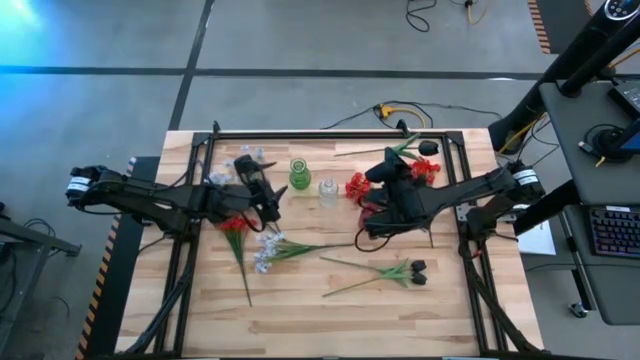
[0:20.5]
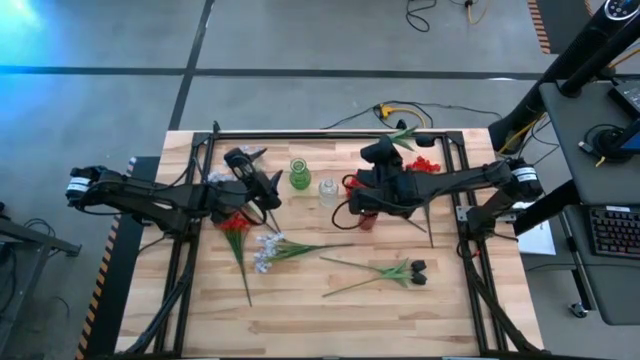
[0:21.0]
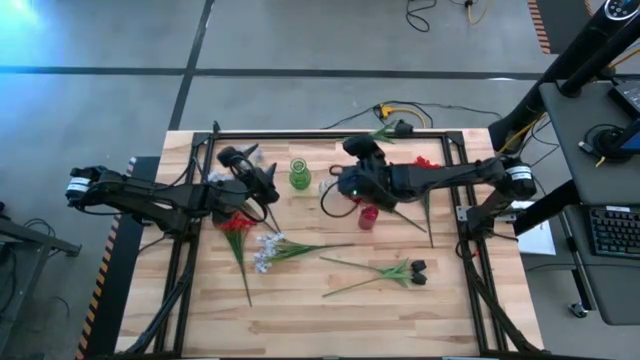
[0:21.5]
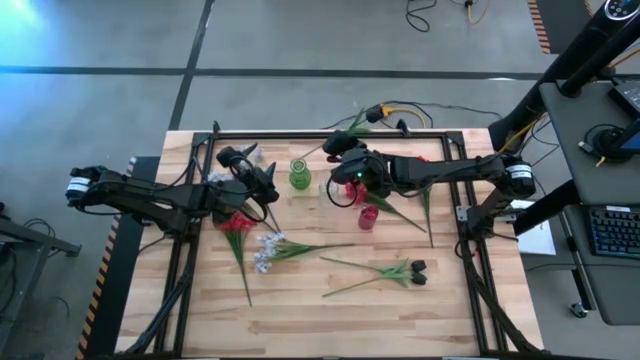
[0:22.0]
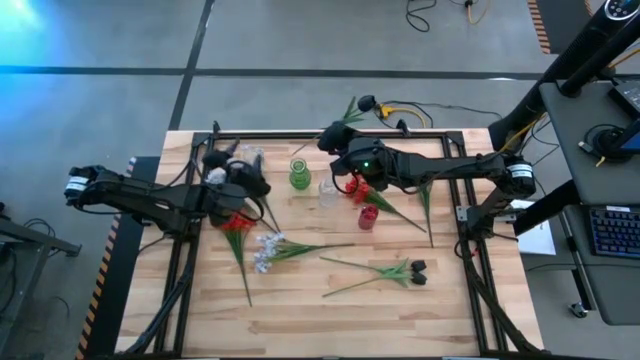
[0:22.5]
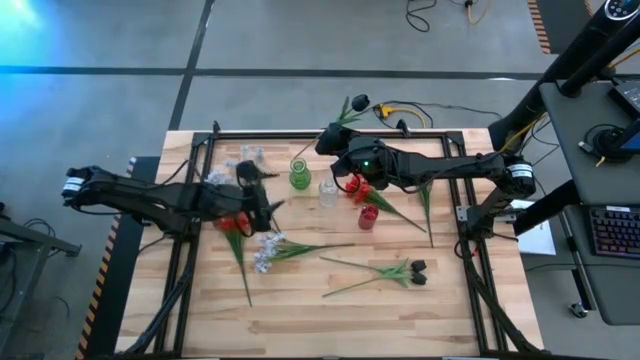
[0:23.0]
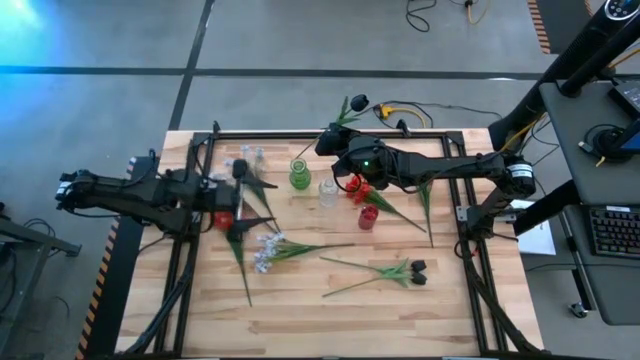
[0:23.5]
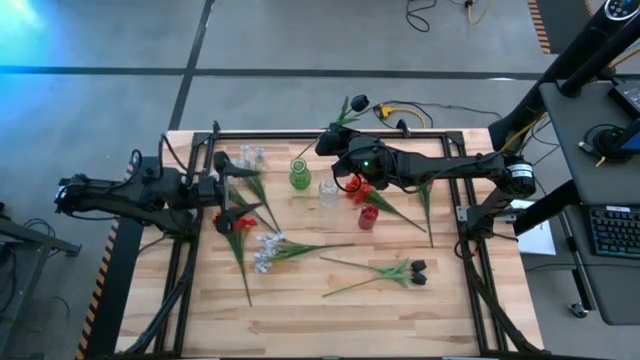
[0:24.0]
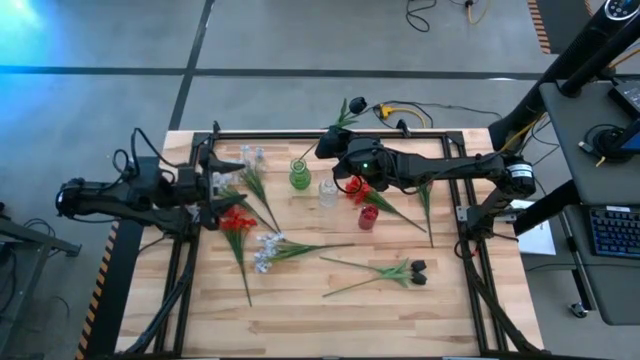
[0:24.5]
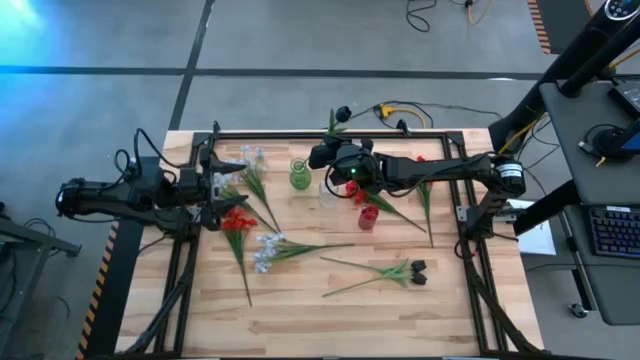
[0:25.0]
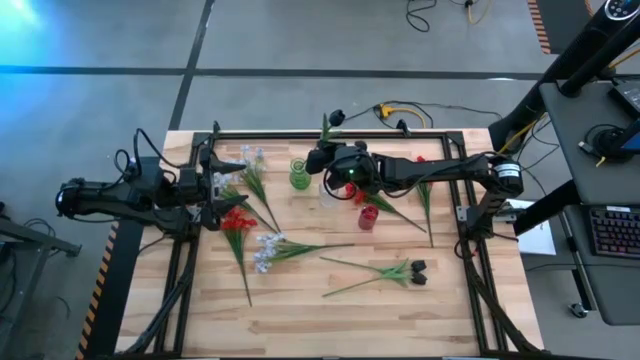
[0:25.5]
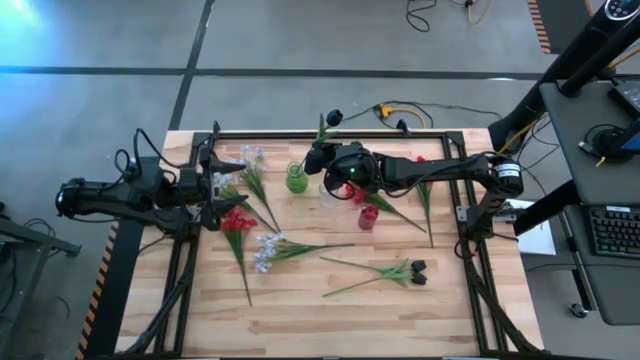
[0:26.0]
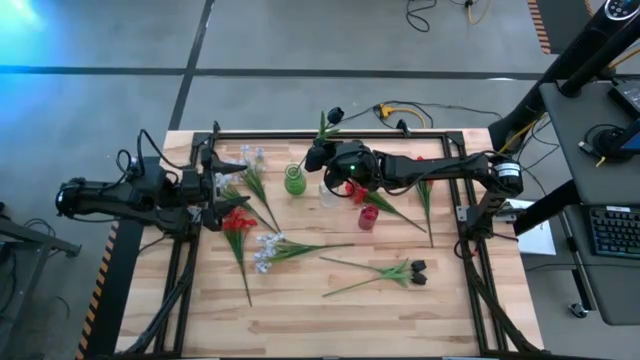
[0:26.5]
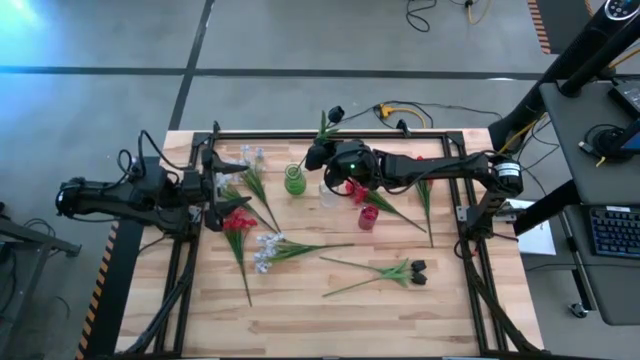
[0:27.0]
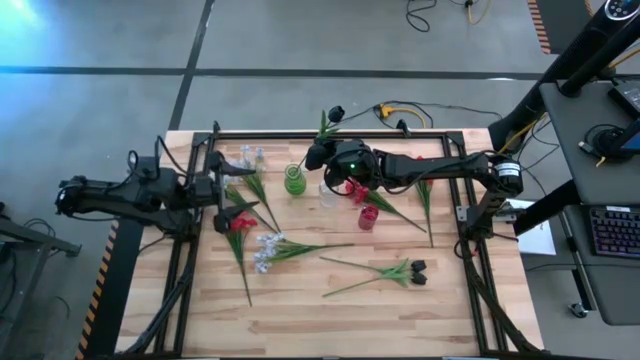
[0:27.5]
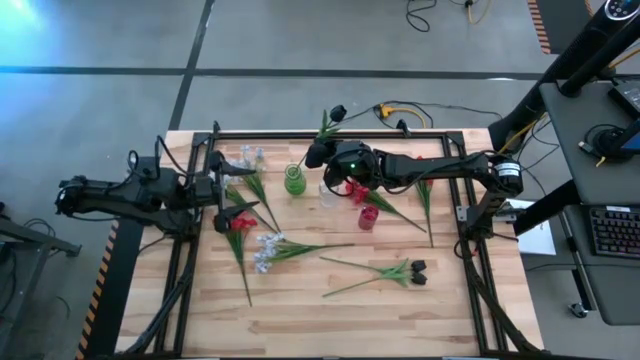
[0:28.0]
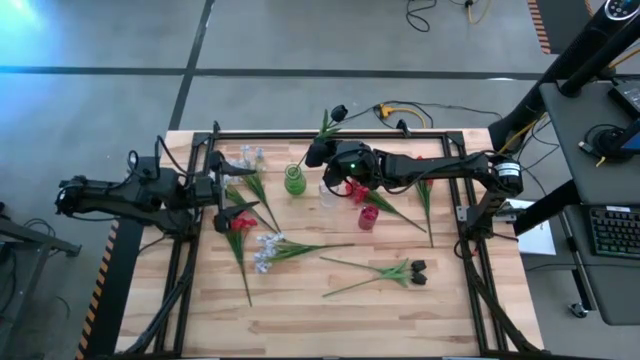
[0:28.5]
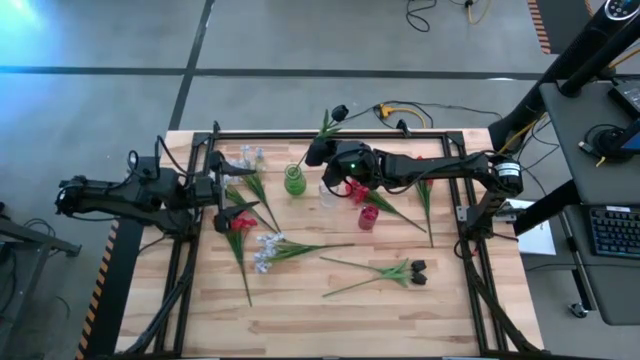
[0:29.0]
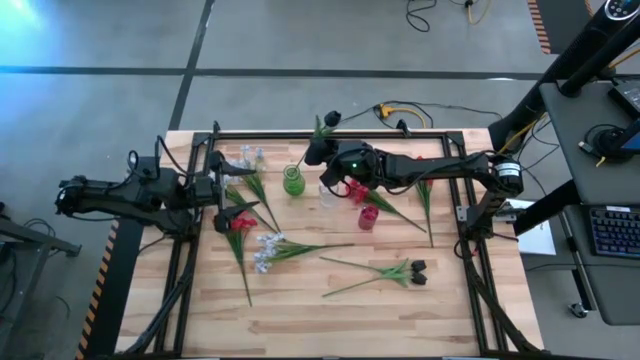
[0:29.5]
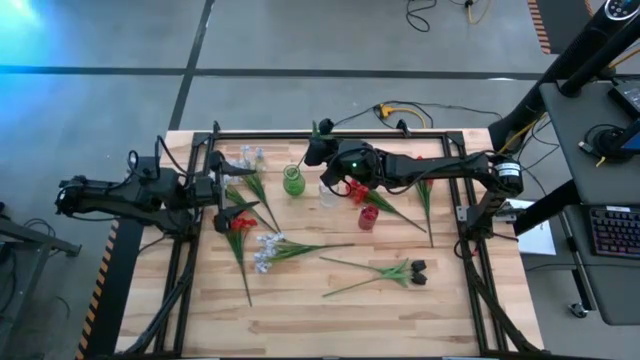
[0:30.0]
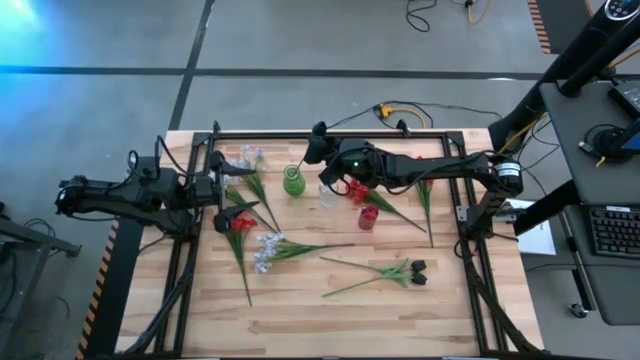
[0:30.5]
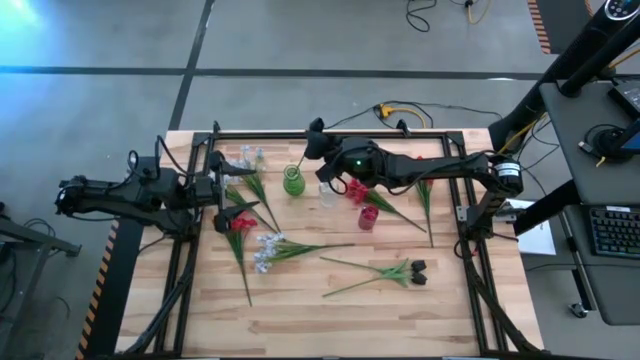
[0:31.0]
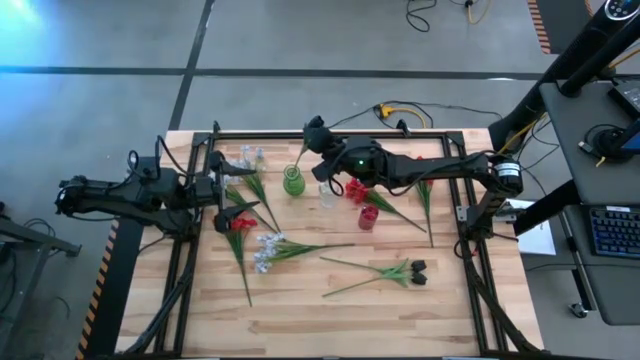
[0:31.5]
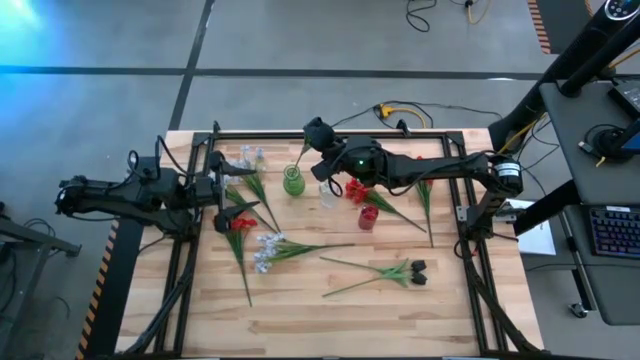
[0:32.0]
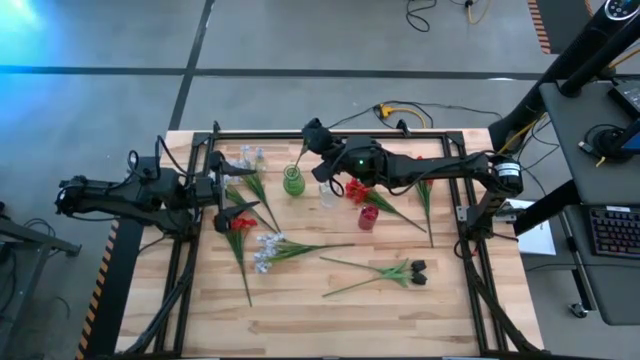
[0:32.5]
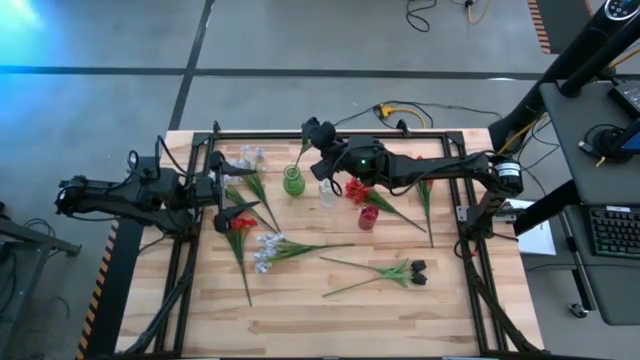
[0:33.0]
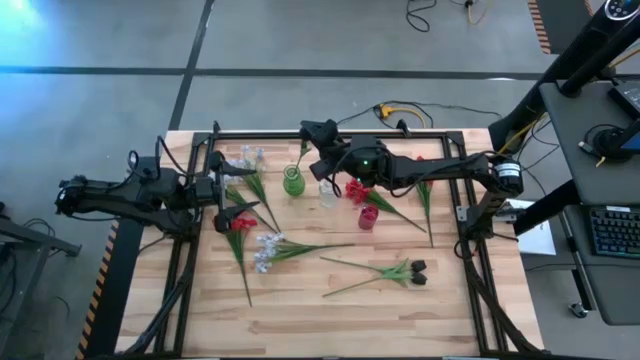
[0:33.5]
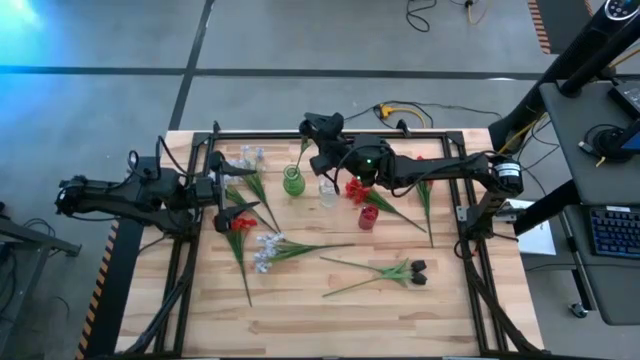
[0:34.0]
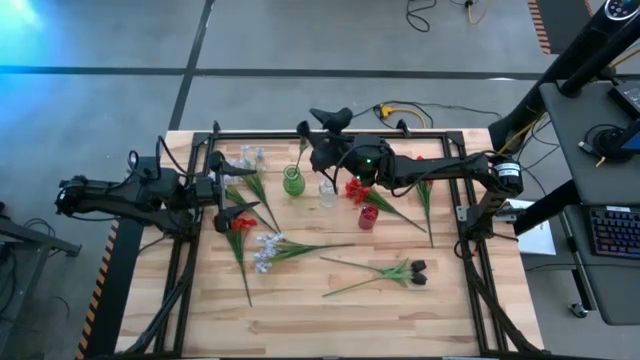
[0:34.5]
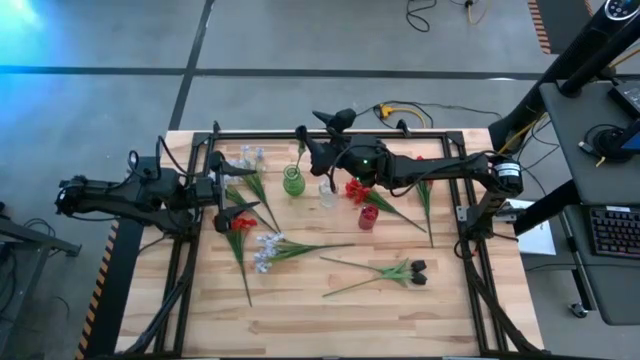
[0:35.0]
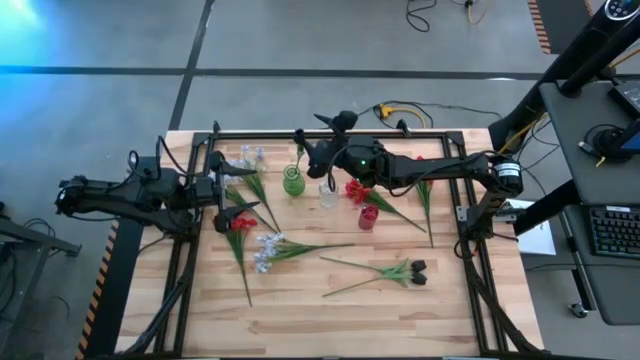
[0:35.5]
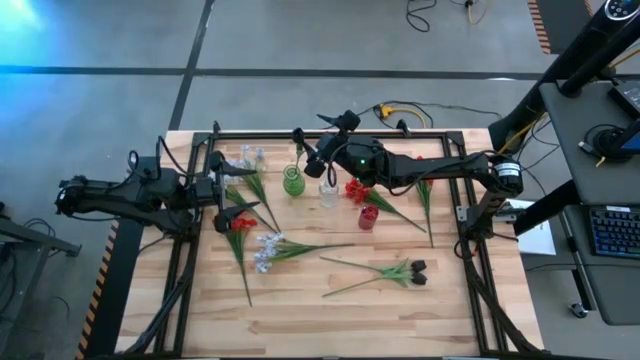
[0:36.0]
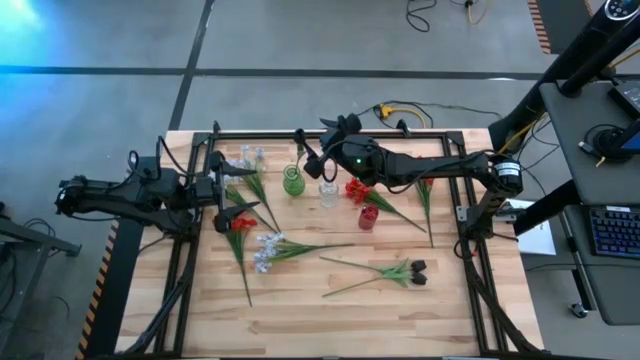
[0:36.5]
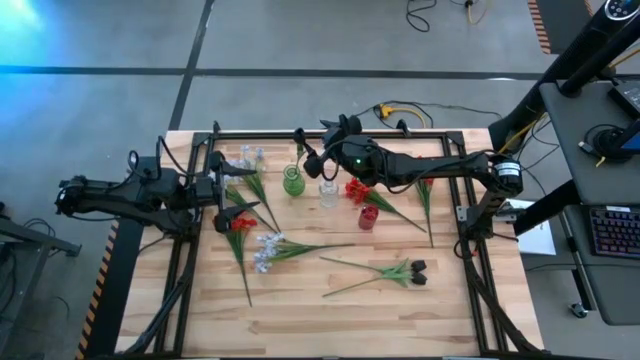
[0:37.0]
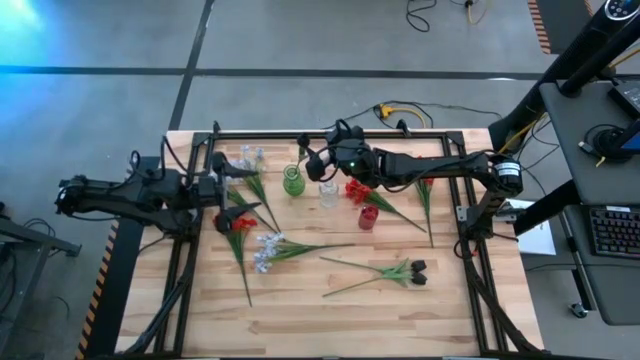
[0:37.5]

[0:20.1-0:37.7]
Task: Sort flowers into vase by color
Put the center black tulip into the green vase
